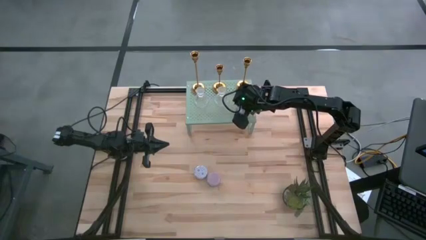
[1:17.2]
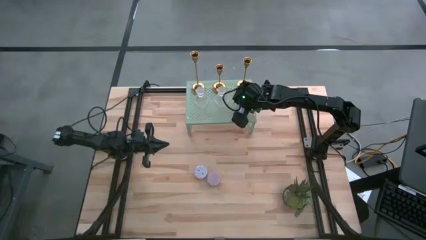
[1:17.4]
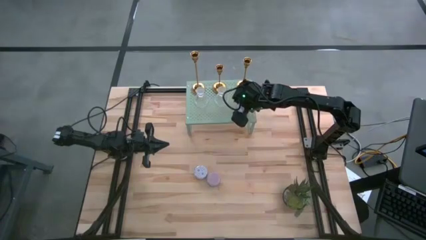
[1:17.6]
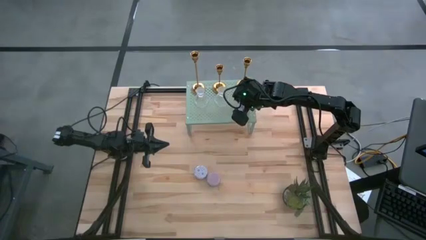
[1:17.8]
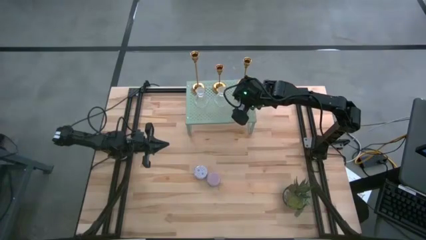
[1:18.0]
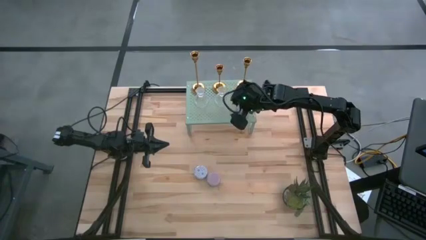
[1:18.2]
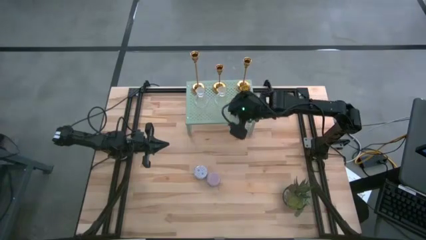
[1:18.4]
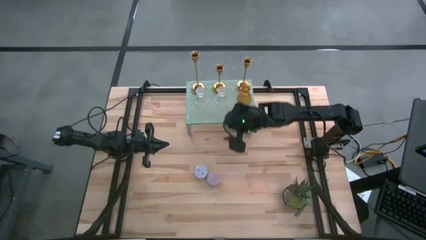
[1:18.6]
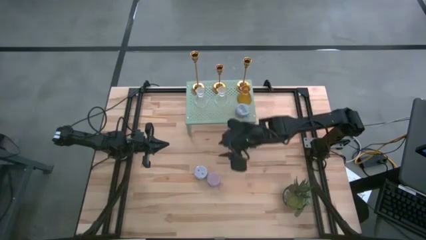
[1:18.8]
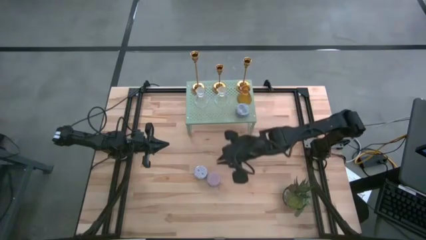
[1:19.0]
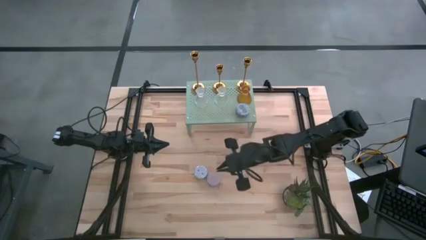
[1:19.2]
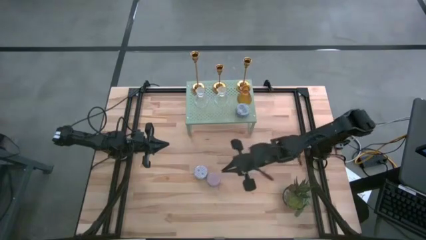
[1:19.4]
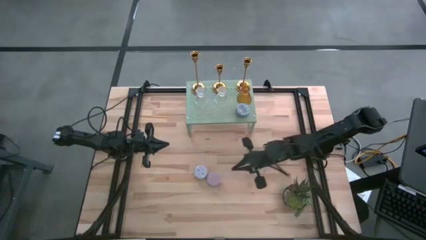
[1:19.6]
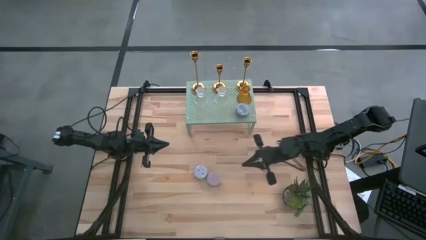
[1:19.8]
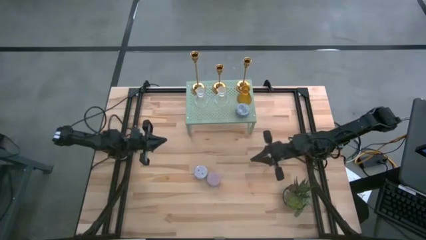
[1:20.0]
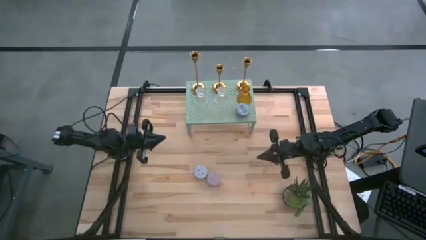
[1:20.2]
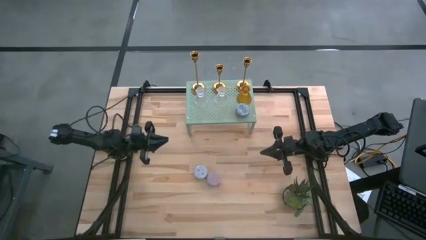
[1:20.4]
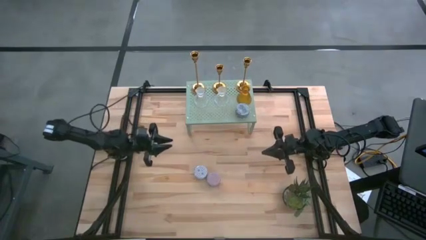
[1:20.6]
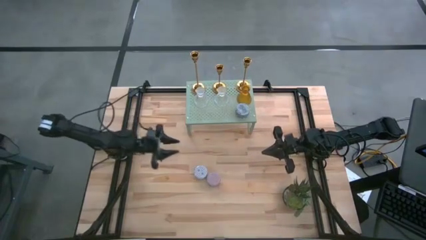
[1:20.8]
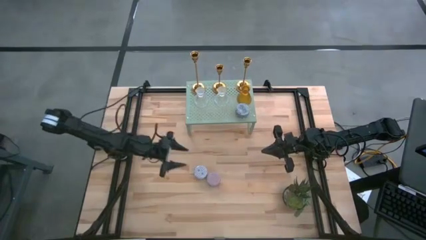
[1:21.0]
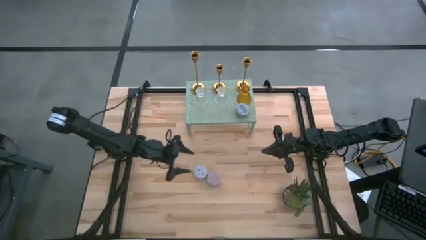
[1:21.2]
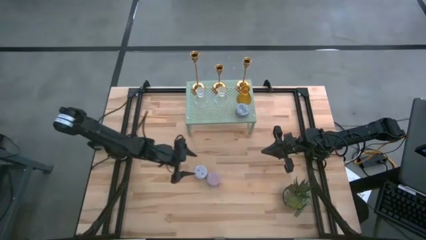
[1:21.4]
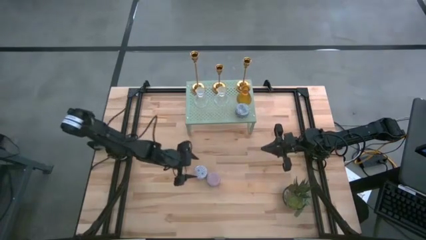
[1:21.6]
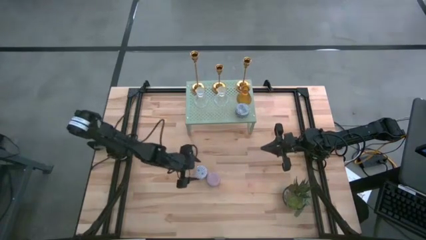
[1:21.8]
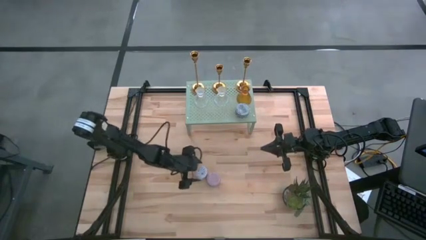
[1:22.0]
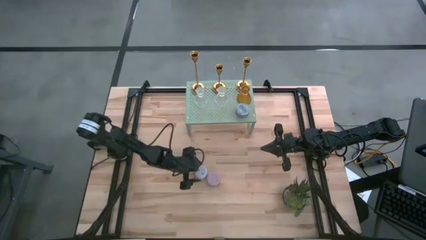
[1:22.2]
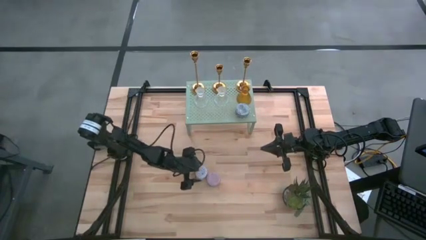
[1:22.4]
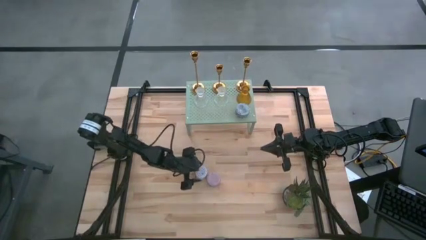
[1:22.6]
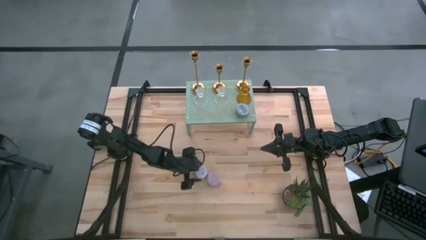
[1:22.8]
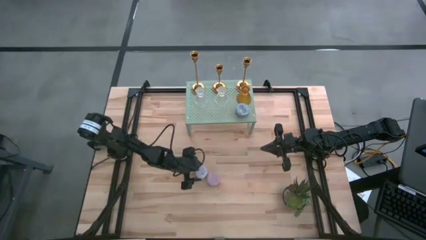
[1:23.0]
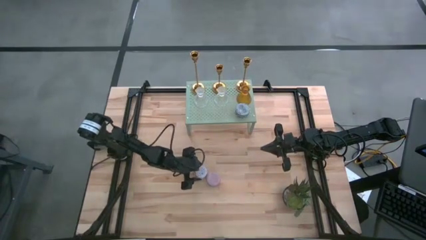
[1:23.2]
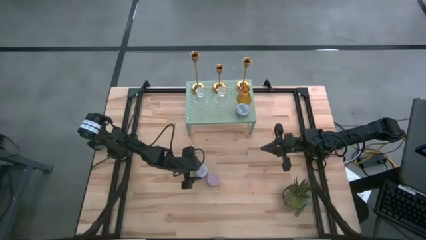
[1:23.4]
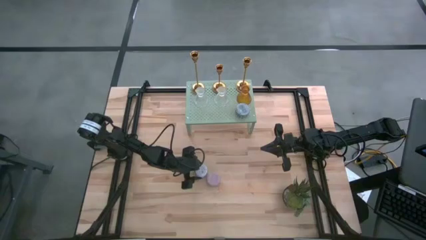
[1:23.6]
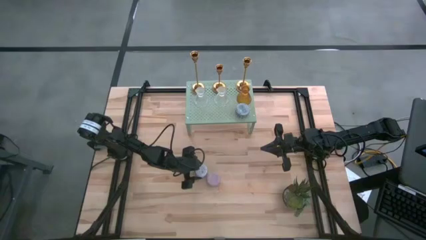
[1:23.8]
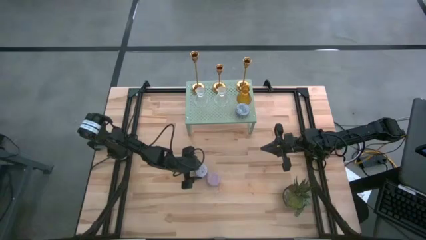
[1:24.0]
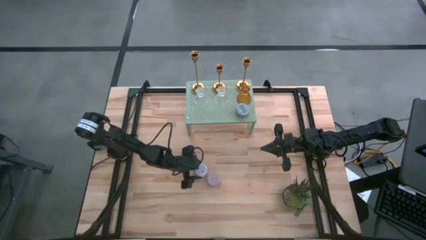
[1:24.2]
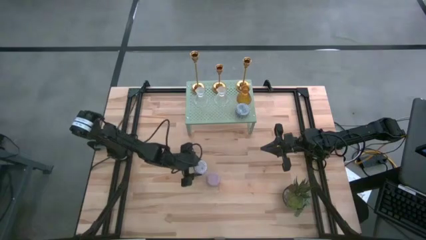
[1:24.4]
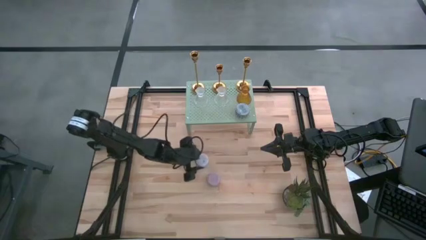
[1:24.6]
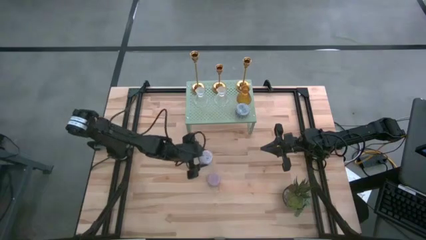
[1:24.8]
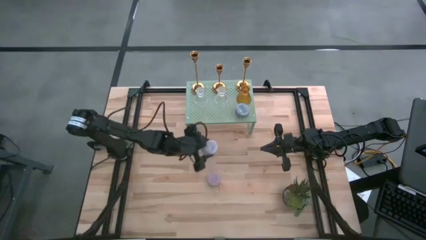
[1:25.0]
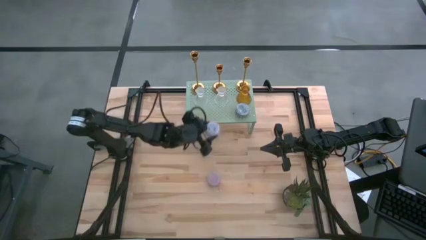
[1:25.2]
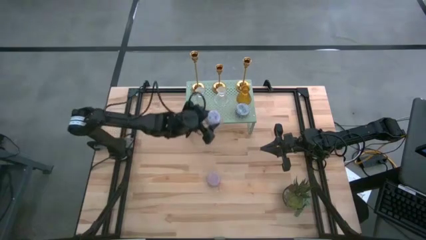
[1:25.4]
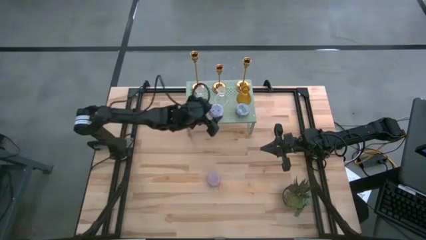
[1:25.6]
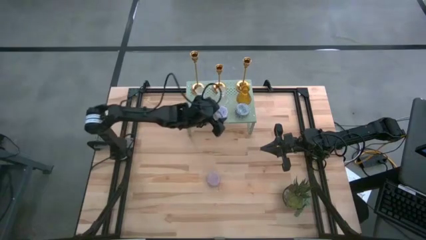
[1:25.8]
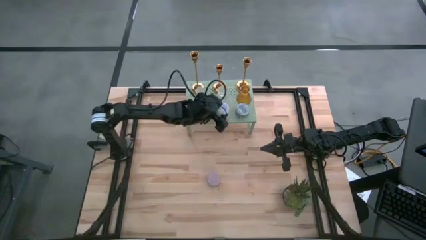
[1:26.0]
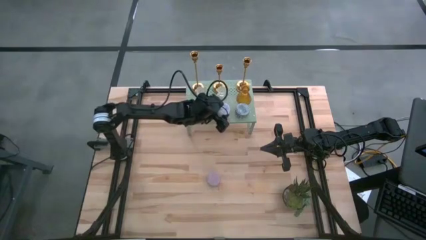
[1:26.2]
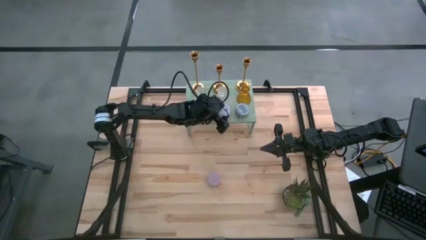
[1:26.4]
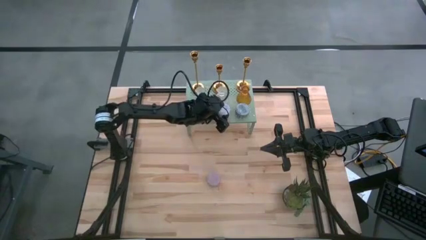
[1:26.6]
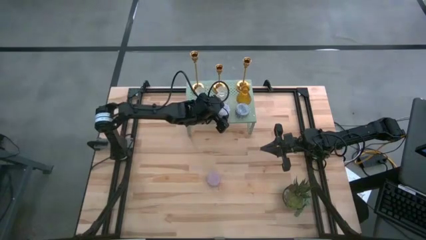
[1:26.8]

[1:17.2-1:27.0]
Task: Pick & Place candle stick holders
Put the white scented candle on the shelf

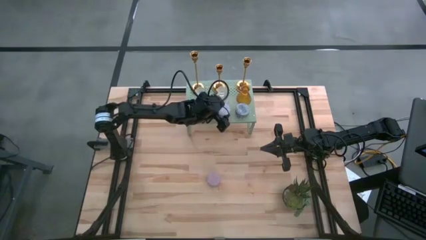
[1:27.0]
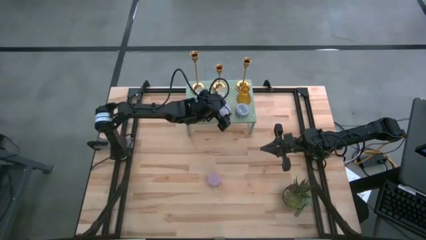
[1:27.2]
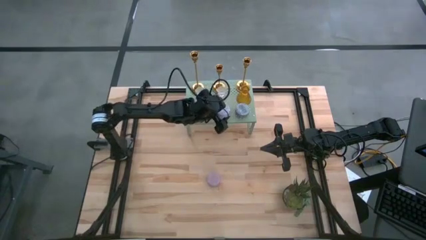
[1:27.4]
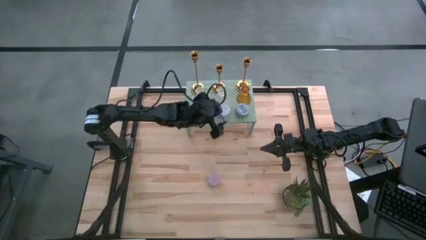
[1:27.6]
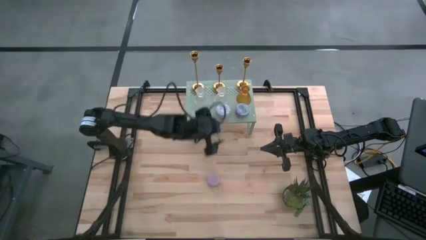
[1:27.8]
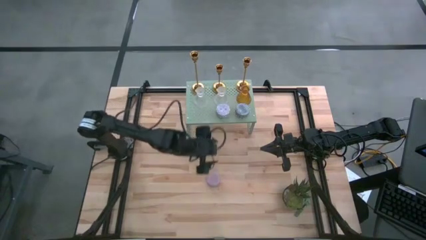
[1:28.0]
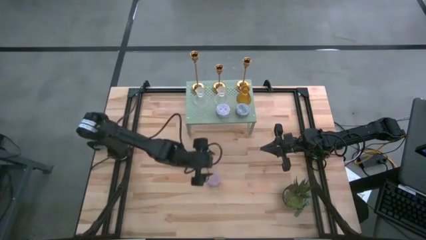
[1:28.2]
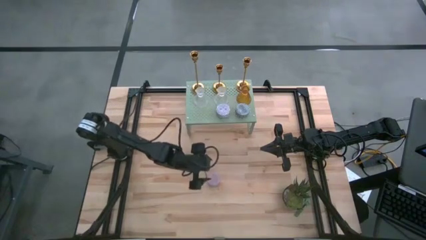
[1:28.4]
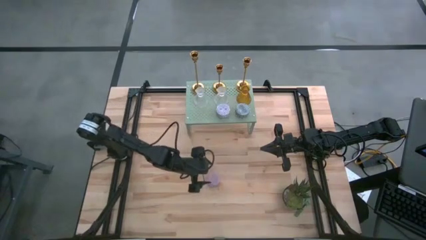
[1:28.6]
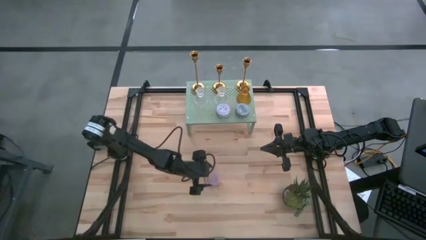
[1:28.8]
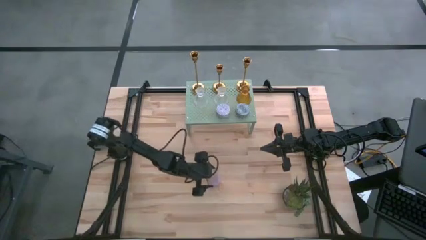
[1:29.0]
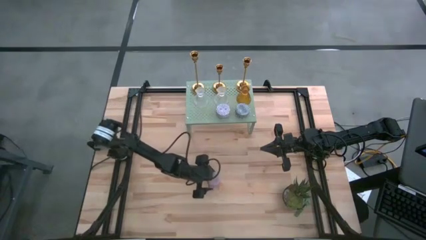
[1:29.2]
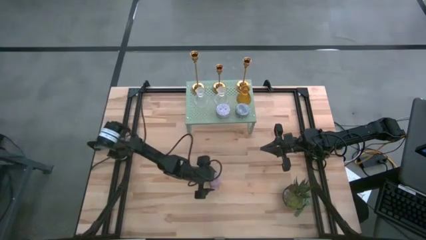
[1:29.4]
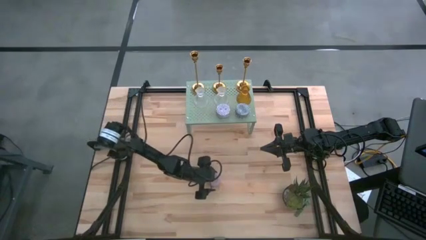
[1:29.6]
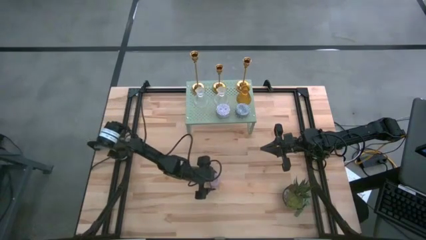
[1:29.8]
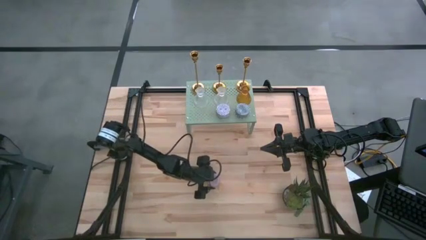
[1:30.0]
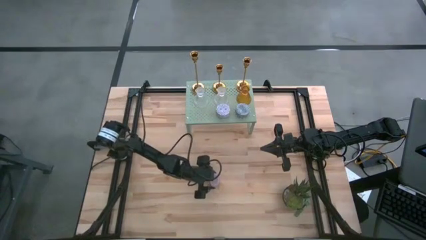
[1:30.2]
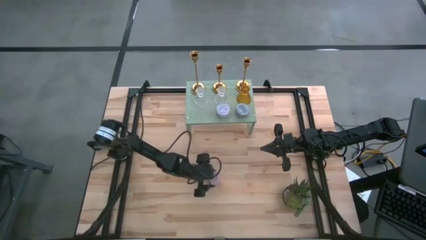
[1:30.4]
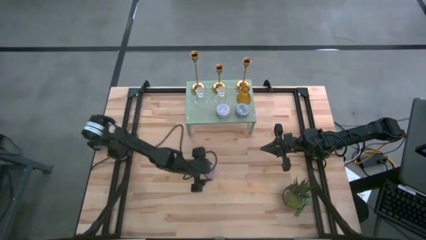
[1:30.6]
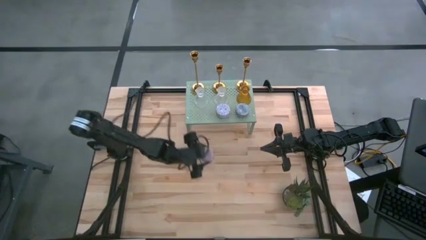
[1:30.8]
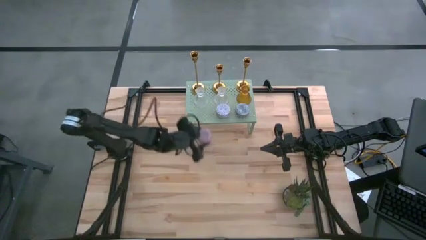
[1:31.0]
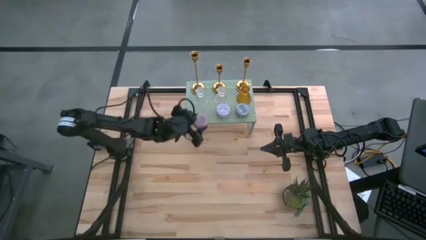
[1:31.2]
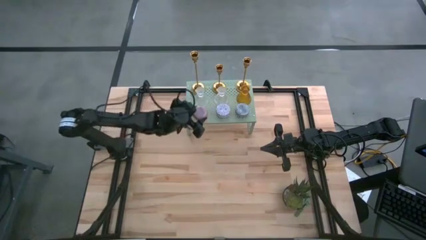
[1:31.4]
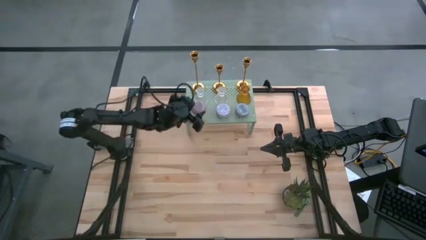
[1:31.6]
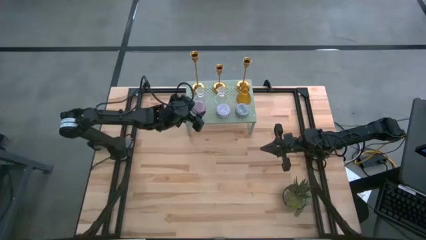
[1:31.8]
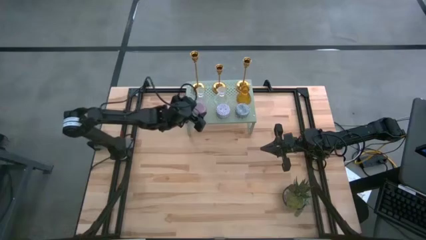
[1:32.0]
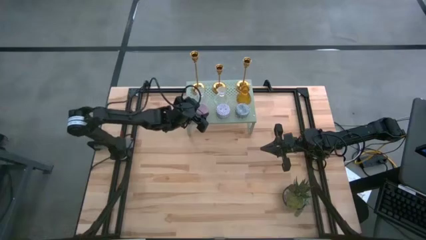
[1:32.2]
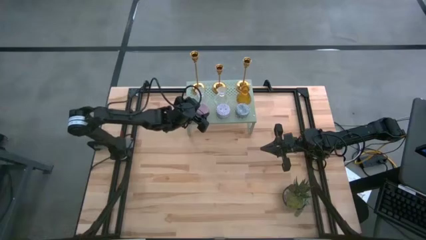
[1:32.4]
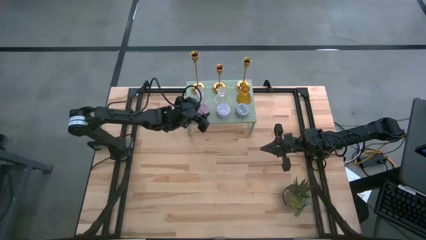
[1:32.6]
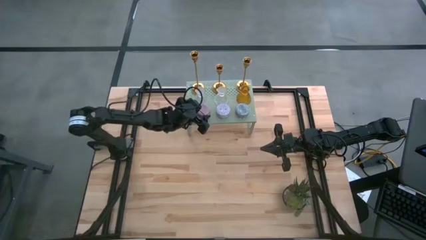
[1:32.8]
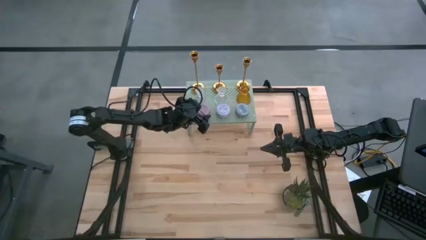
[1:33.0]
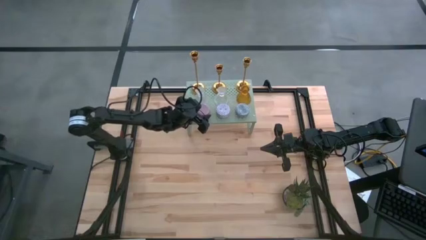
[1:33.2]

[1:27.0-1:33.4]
Put the pink scented candle on the shelf

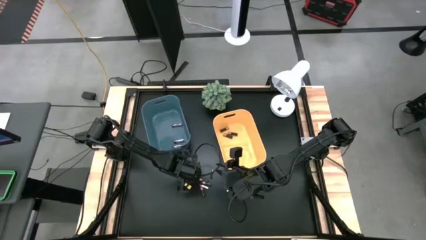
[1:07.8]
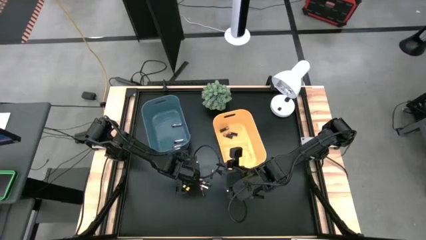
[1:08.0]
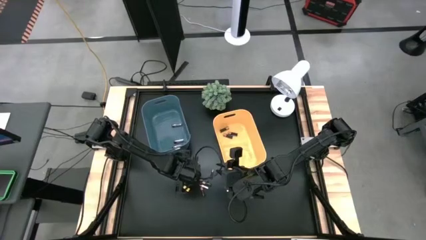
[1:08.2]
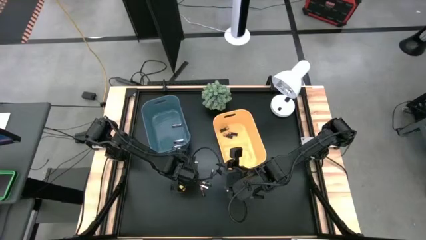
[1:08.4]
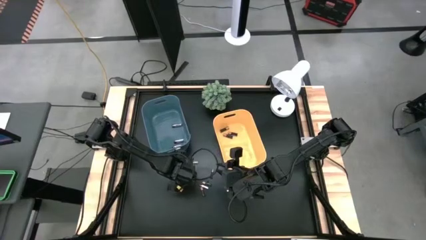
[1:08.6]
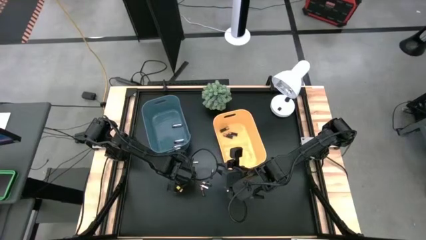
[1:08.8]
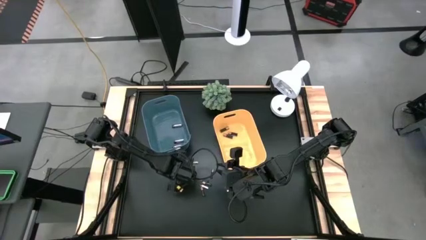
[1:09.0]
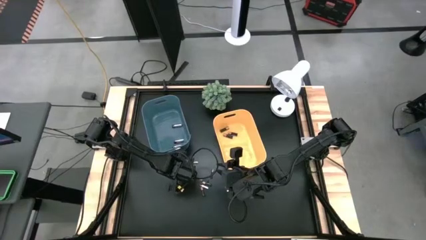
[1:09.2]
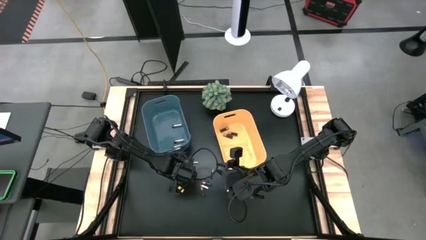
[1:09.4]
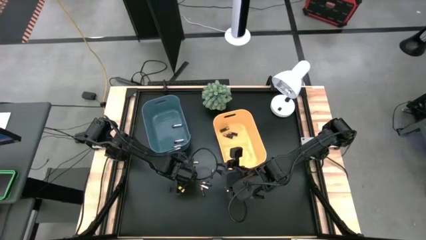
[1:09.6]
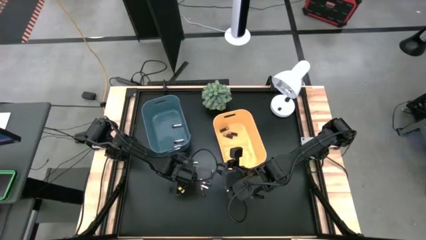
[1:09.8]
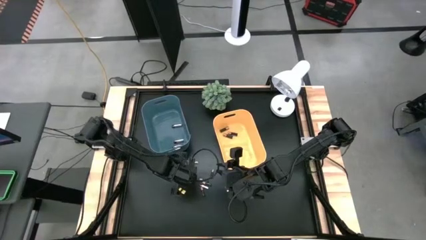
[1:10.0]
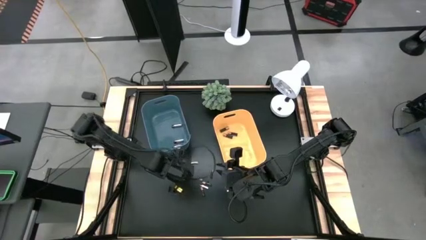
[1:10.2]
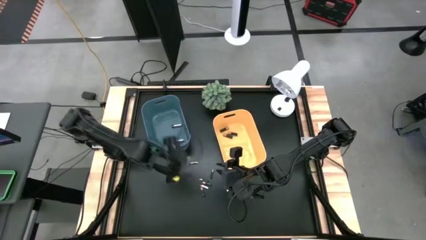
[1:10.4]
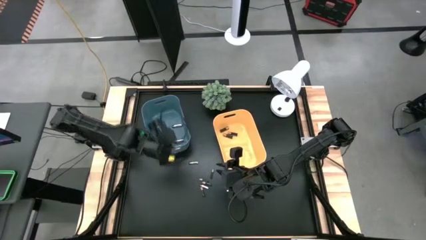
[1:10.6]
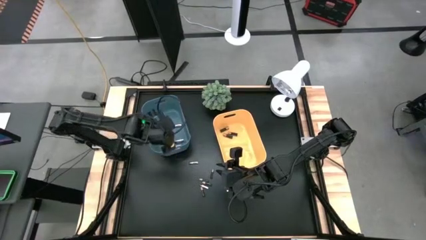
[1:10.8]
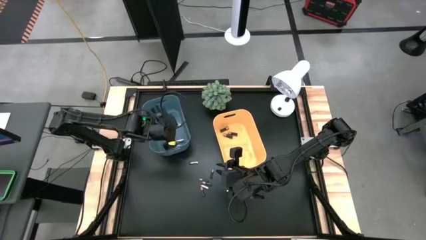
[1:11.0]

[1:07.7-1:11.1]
Task: Sort batteries
Put the silver battery into the blue bin
